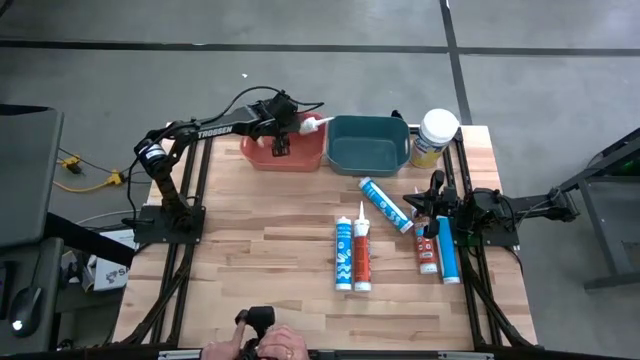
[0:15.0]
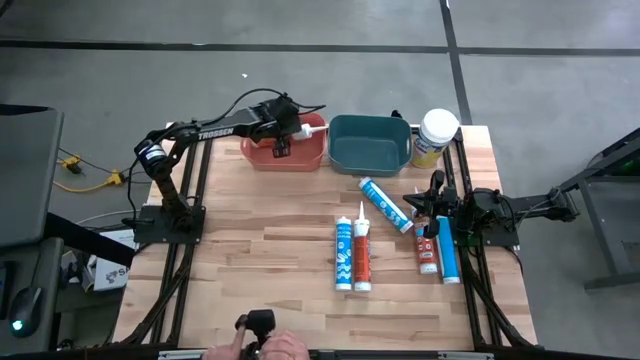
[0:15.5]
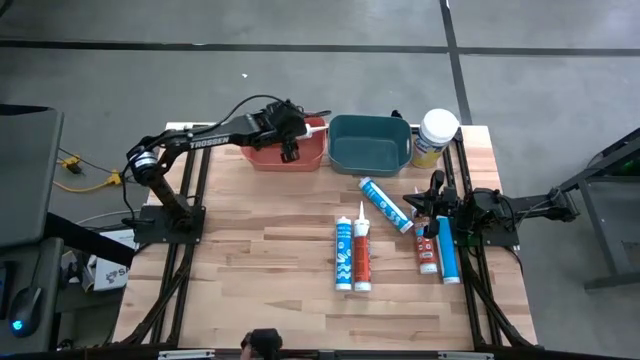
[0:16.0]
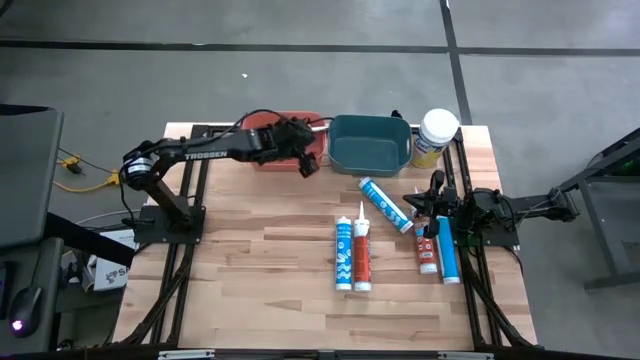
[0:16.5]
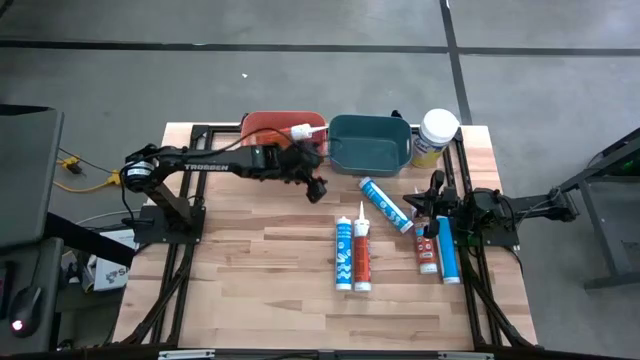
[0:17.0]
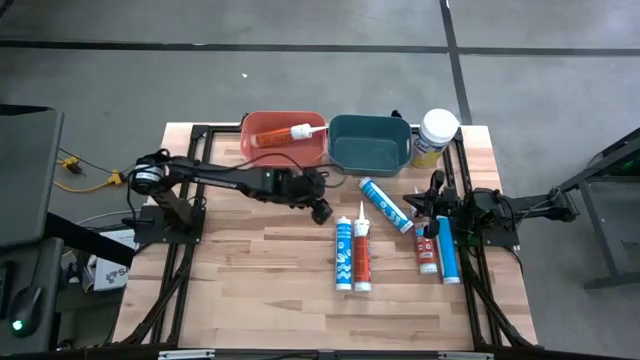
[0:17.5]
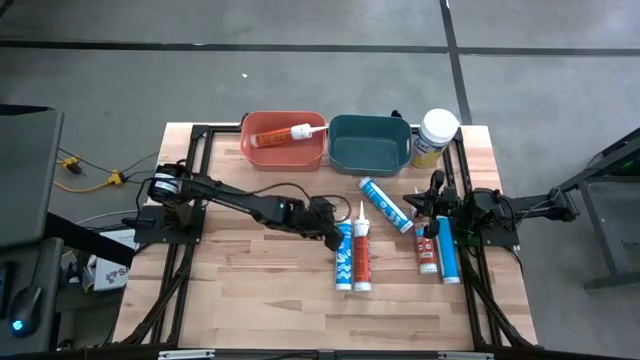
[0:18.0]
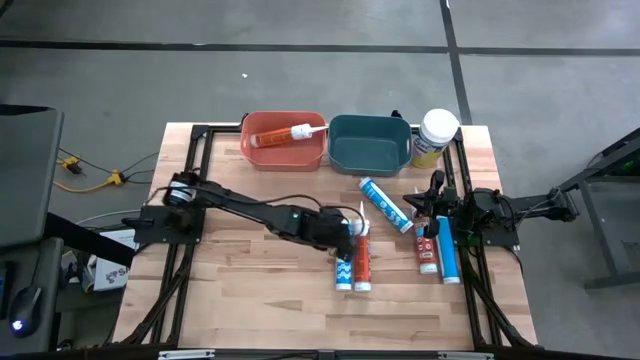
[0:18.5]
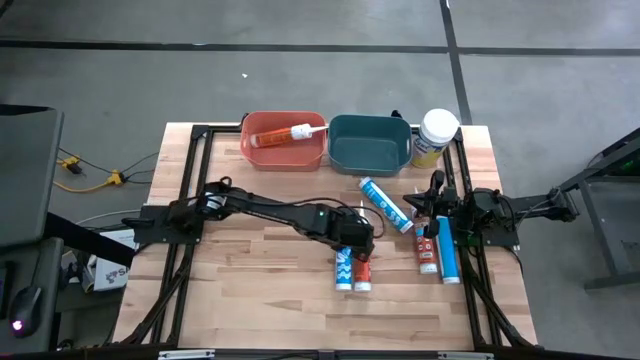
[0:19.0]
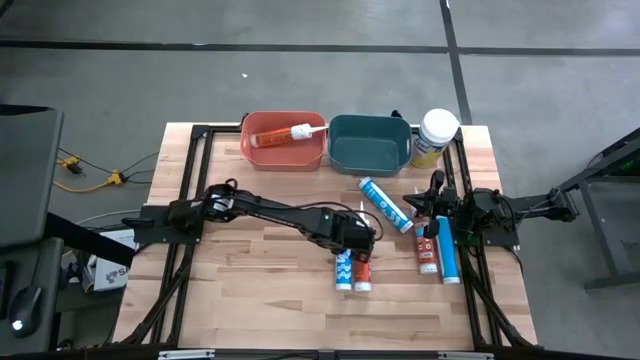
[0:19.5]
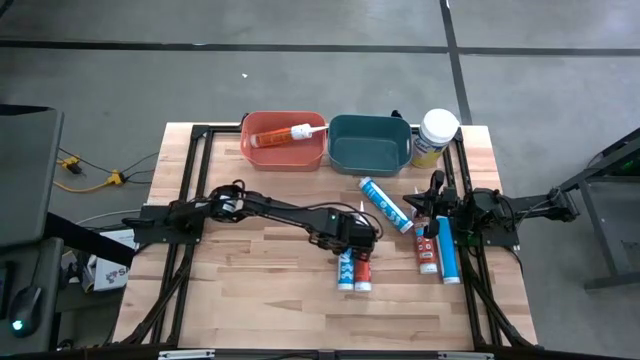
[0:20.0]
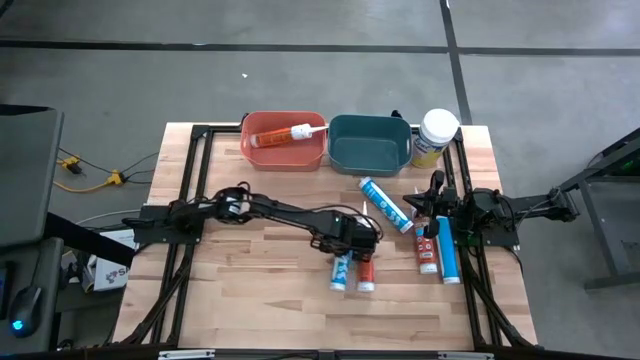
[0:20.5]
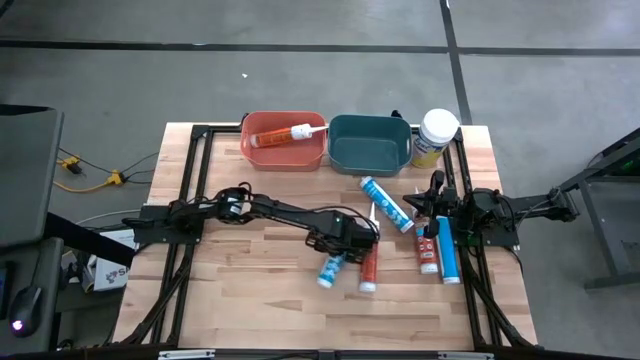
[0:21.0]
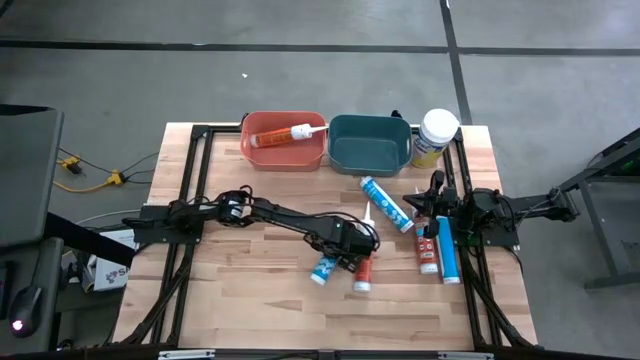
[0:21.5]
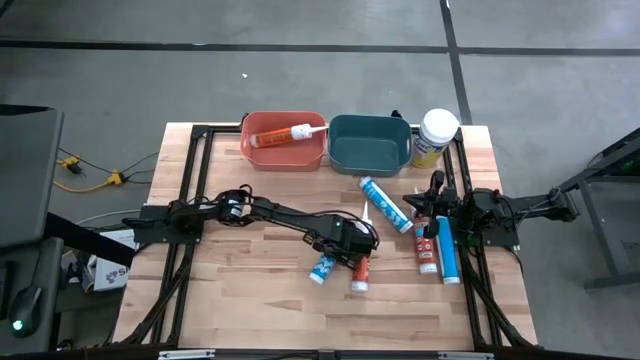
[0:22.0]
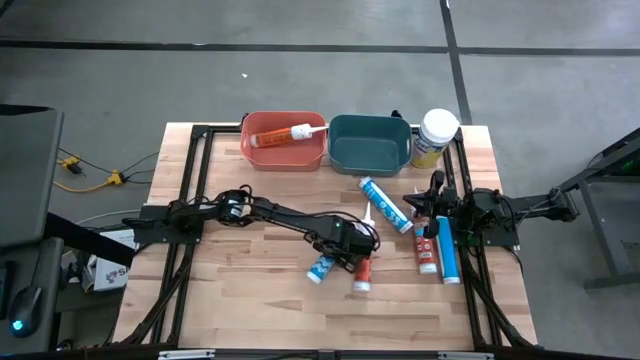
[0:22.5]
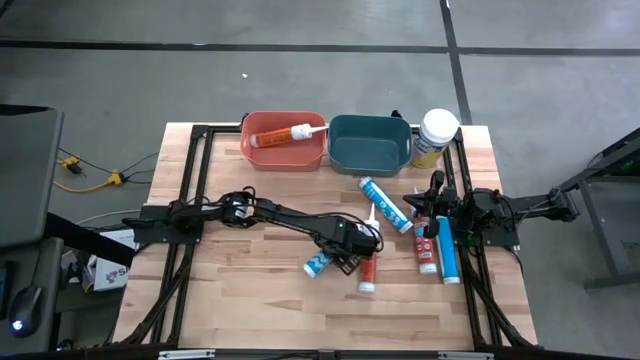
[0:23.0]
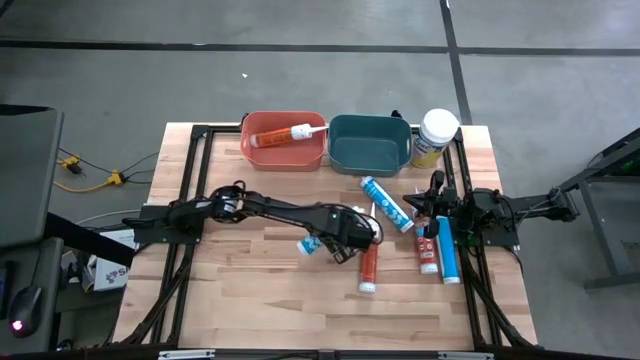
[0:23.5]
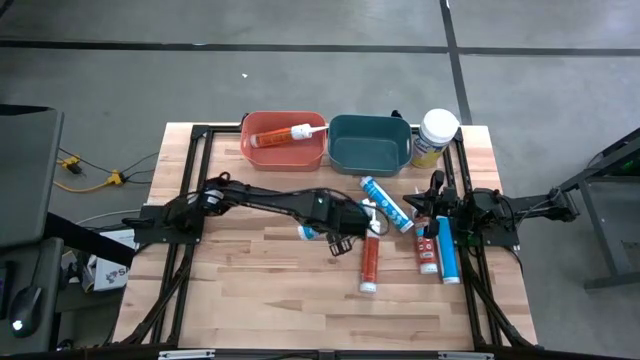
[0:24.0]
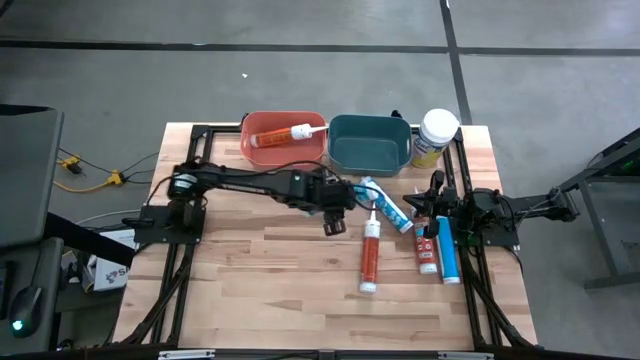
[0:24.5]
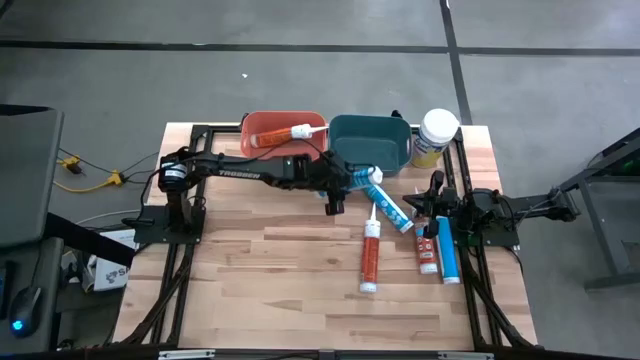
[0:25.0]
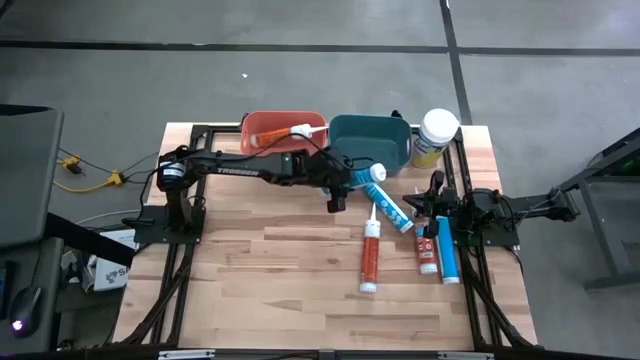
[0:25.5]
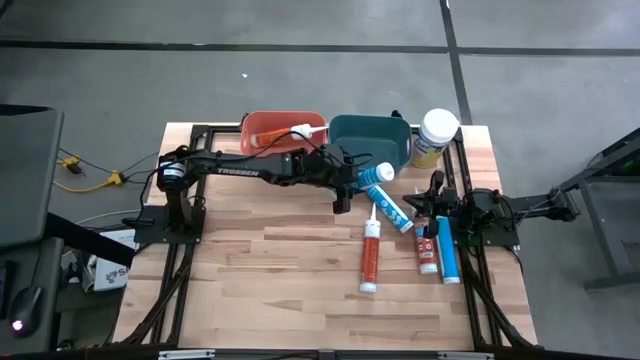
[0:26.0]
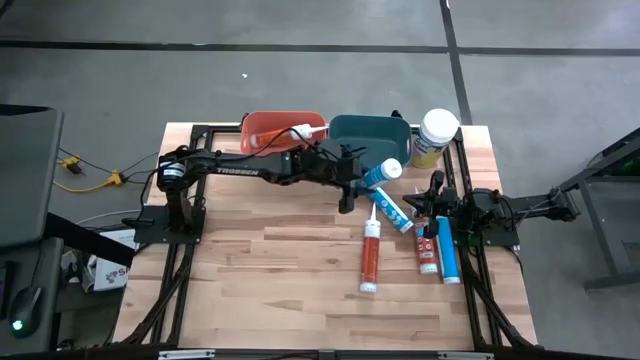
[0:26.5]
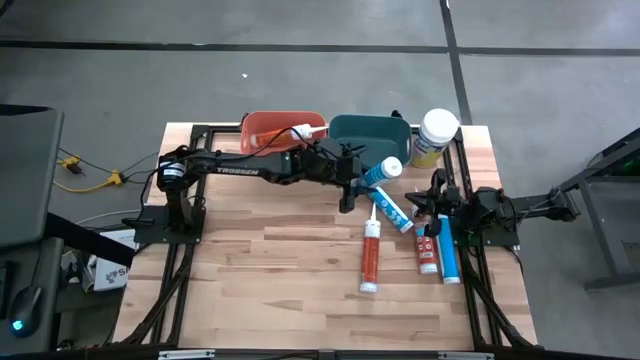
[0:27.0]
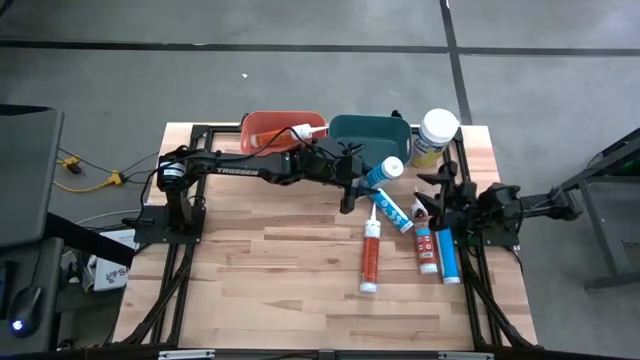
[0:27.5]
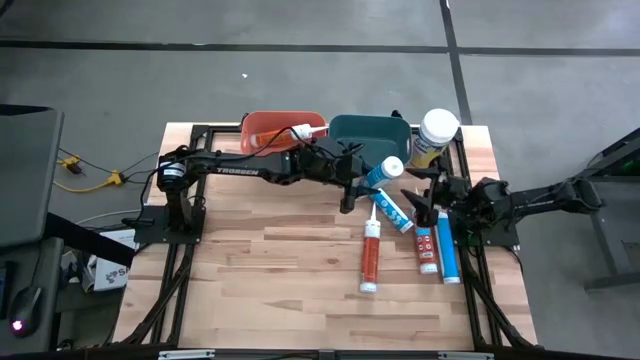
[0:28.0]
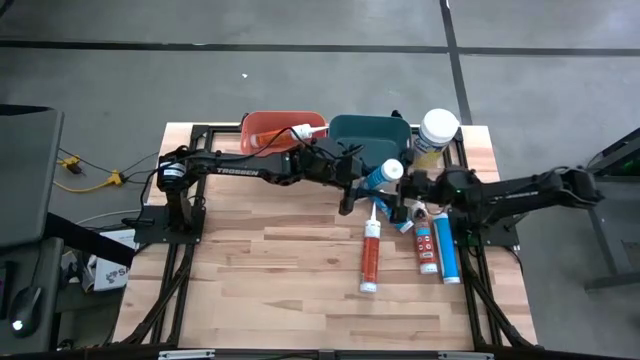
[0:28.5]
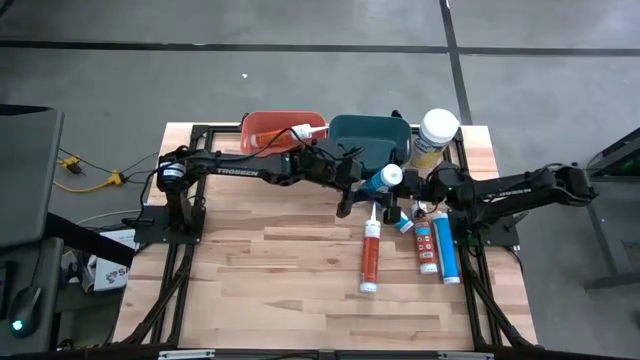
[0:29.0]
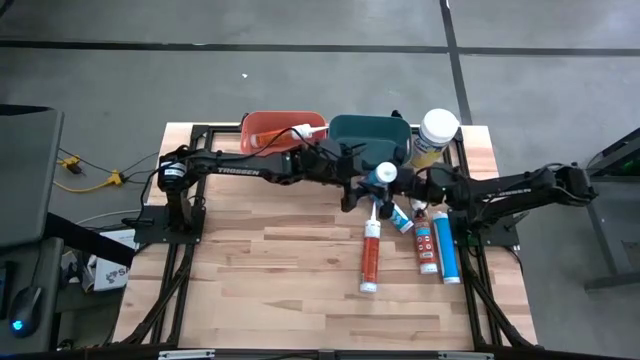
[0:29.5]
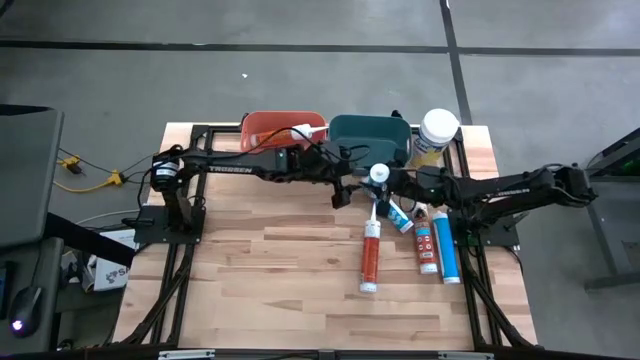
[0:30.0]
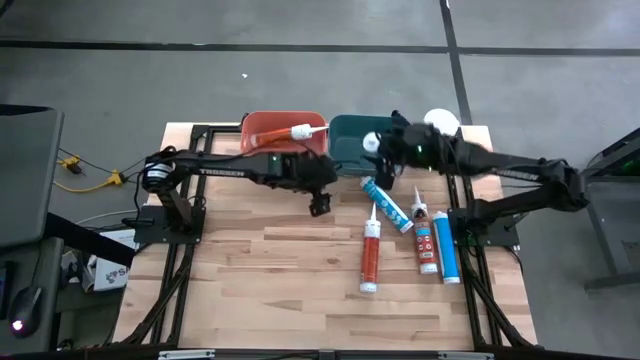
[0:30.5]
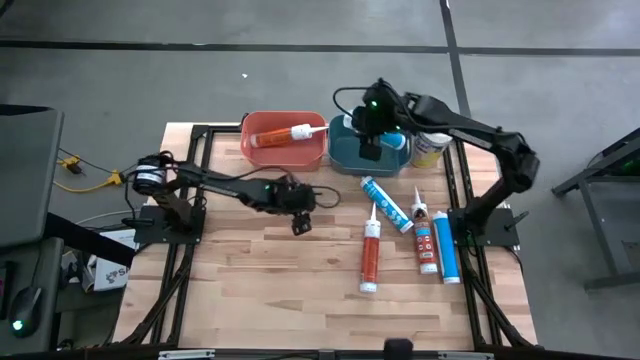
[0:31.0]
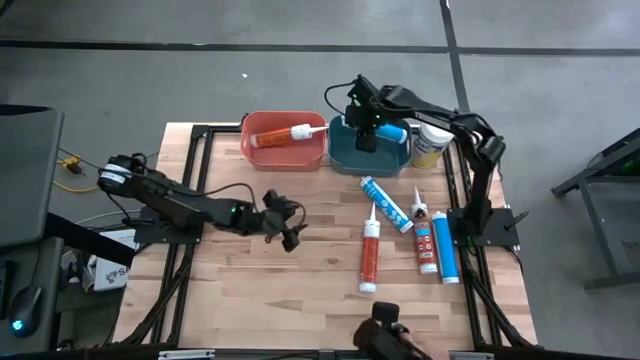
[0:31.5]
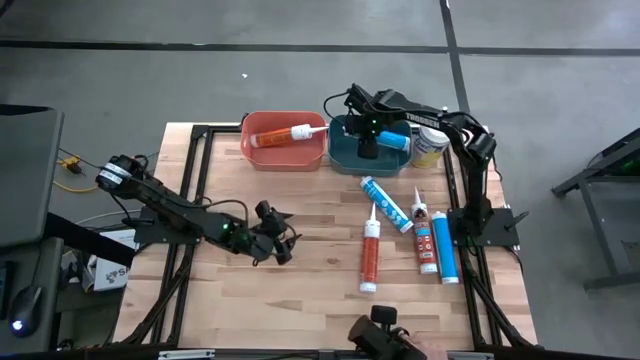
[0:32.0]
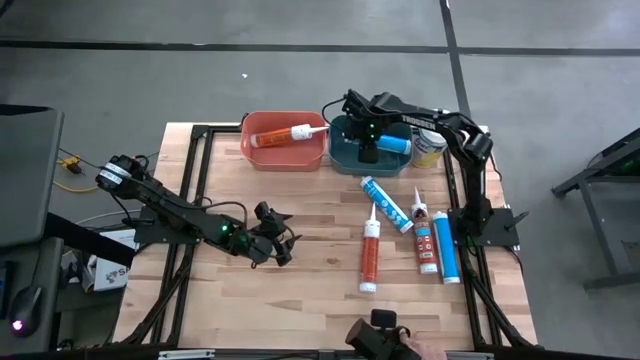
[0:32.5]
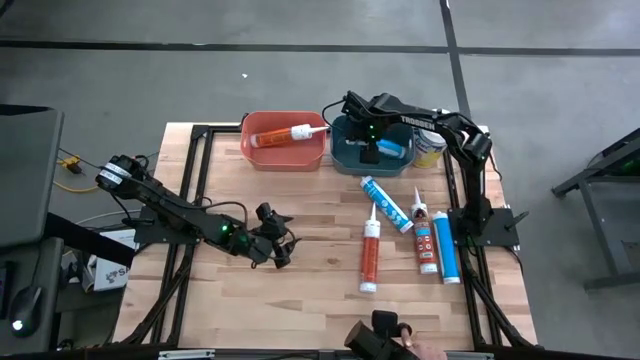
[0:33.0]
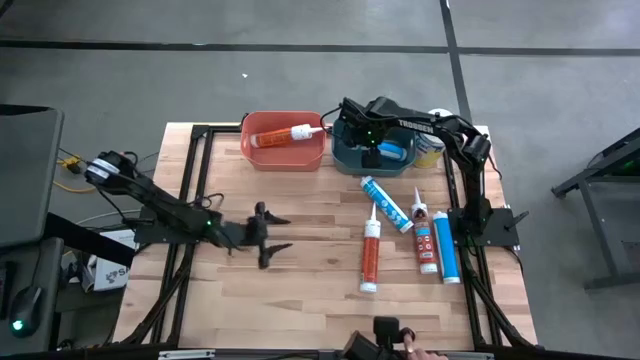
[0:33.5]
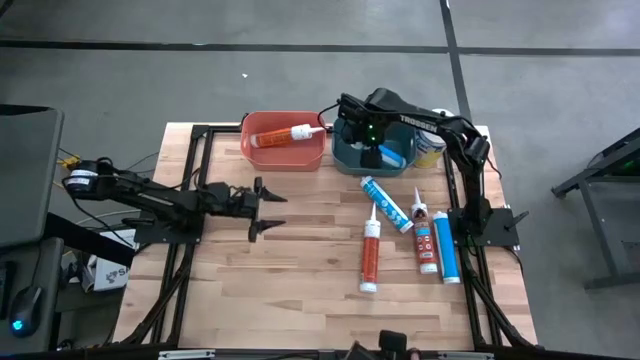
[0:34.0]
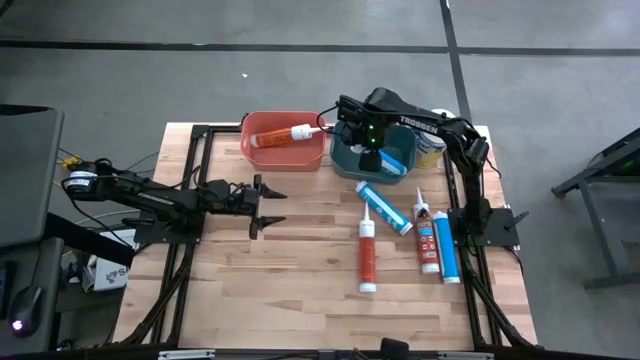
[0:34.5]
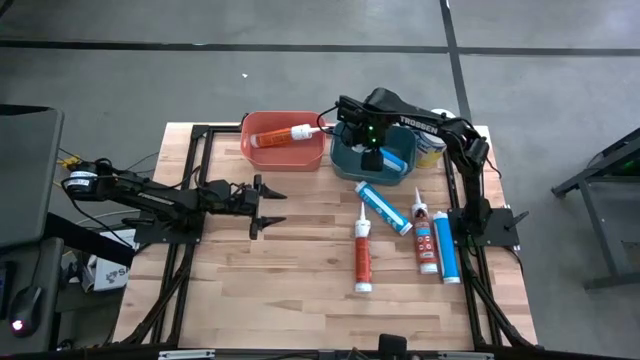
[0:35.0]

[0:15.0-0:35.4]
Task: Pick & place silicon tubes, Sealant and Lysol wipes
Put the left blue sealant into the blue bin
